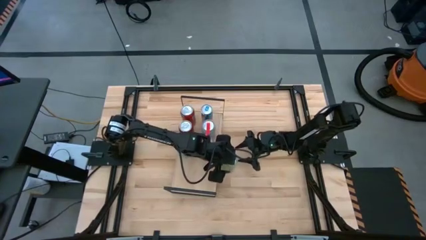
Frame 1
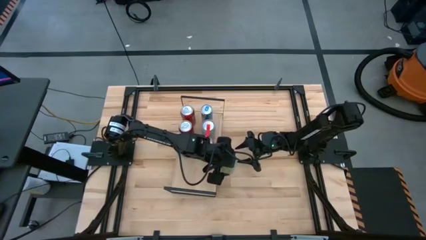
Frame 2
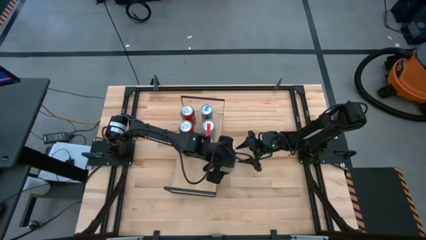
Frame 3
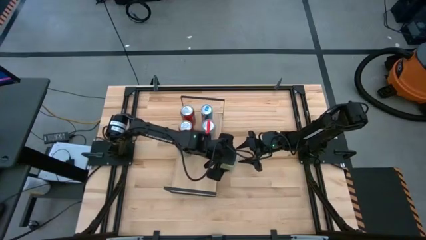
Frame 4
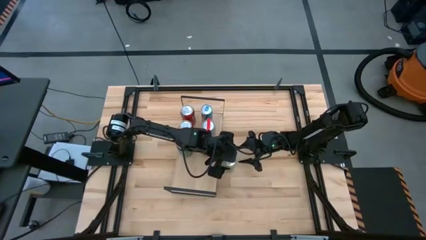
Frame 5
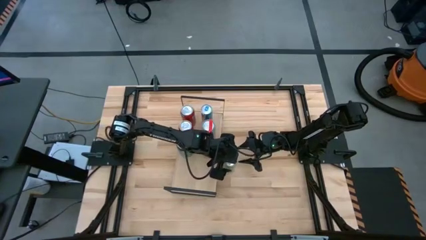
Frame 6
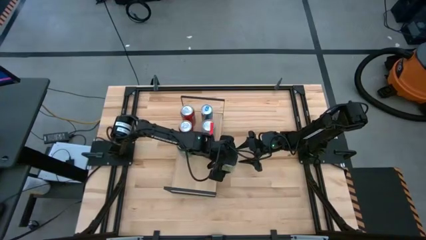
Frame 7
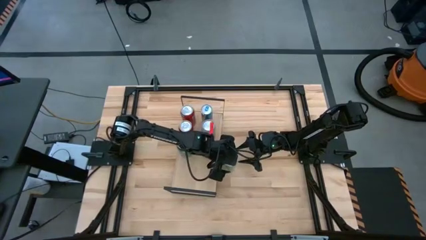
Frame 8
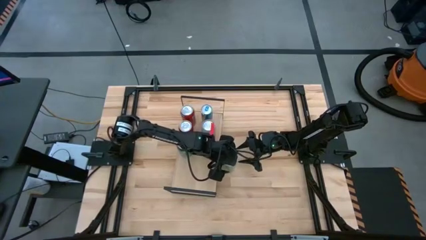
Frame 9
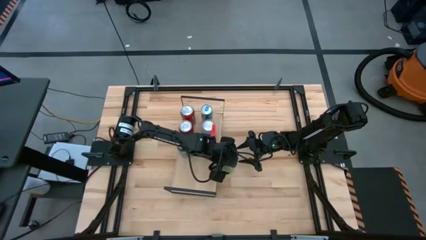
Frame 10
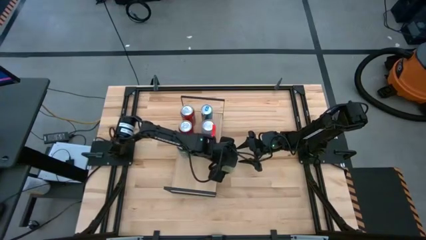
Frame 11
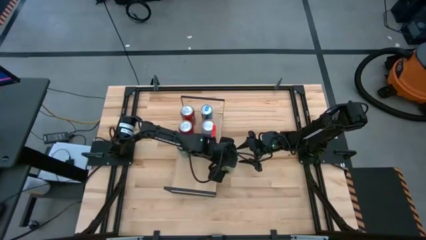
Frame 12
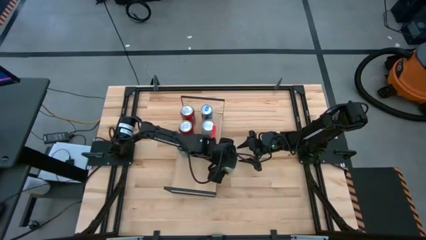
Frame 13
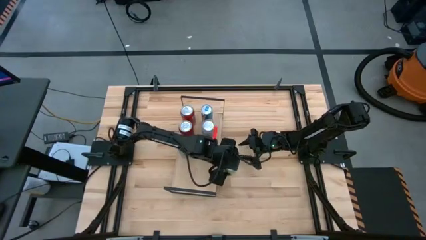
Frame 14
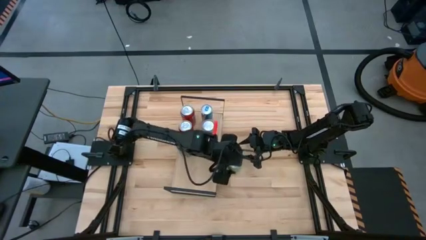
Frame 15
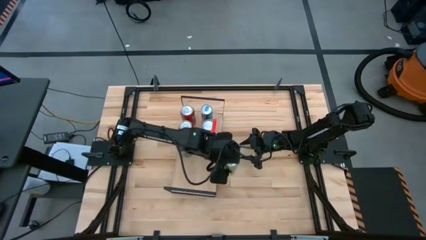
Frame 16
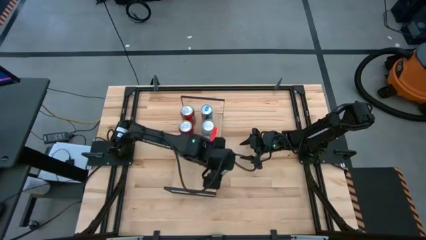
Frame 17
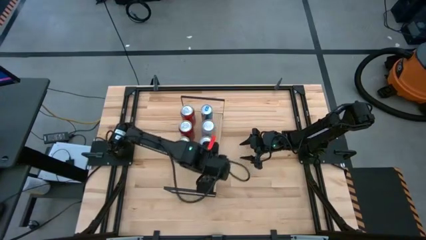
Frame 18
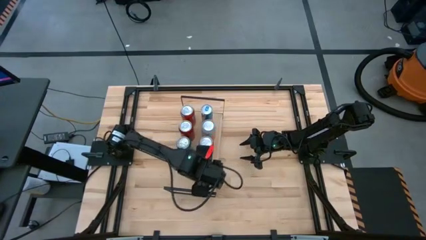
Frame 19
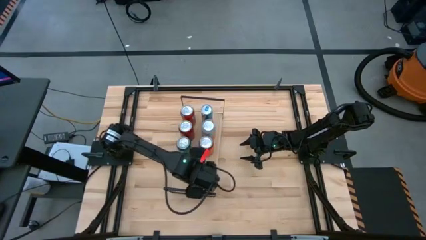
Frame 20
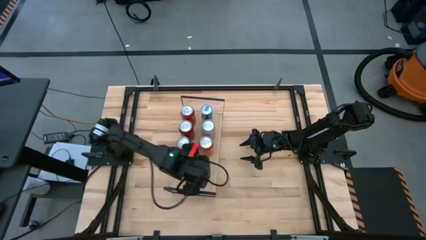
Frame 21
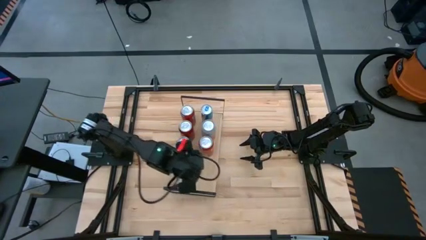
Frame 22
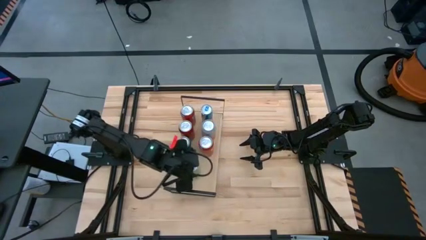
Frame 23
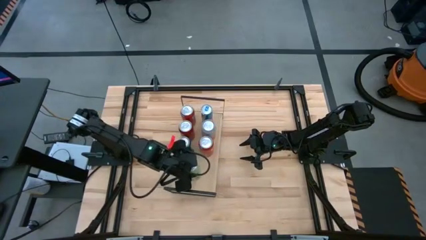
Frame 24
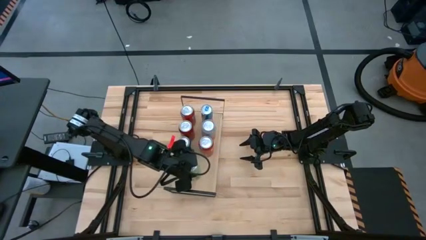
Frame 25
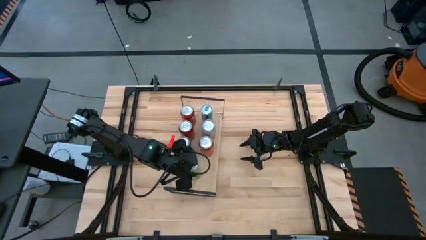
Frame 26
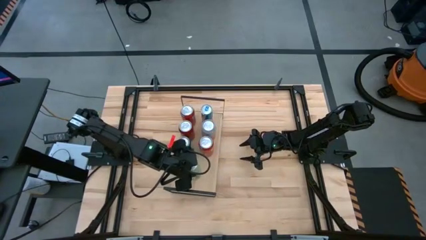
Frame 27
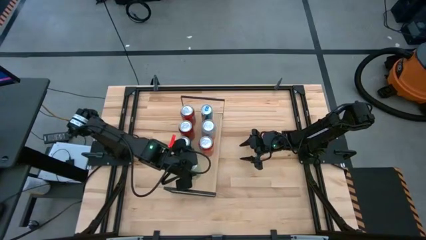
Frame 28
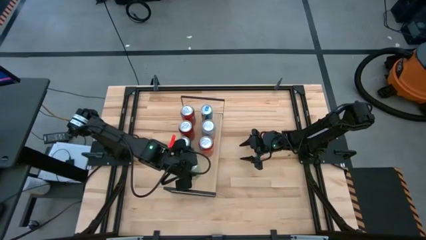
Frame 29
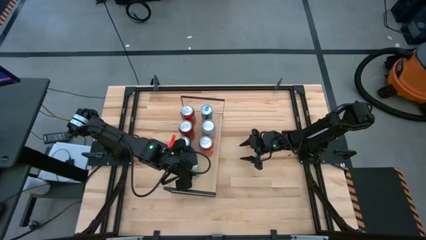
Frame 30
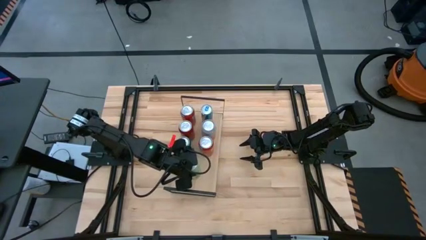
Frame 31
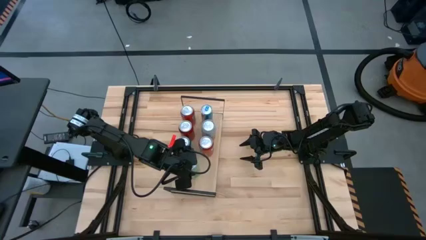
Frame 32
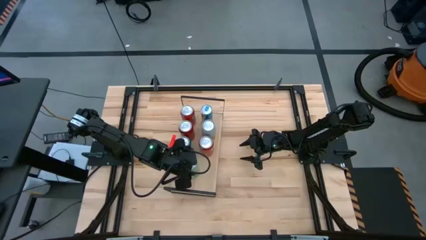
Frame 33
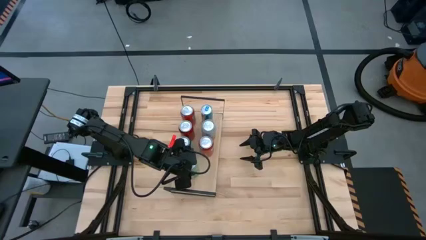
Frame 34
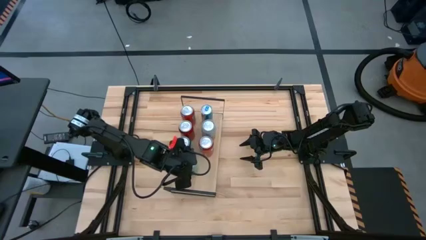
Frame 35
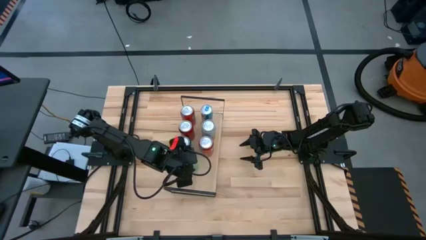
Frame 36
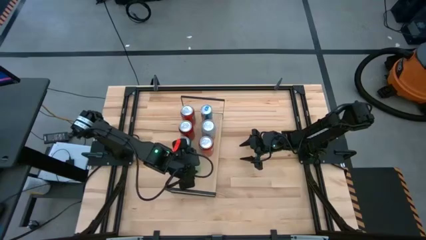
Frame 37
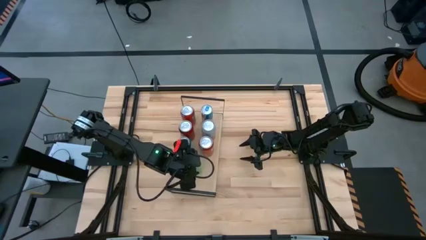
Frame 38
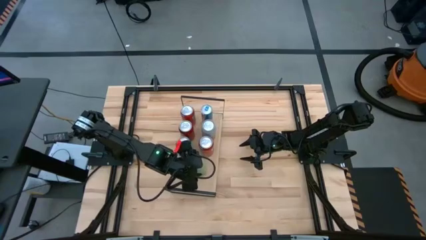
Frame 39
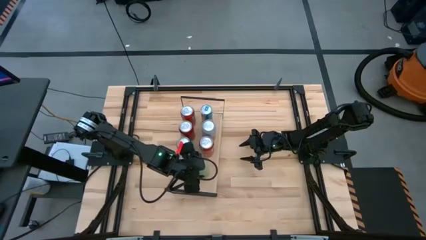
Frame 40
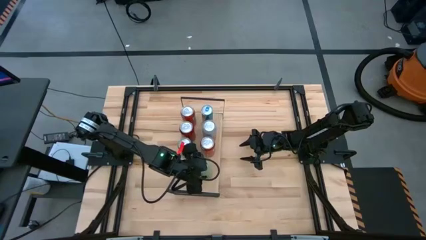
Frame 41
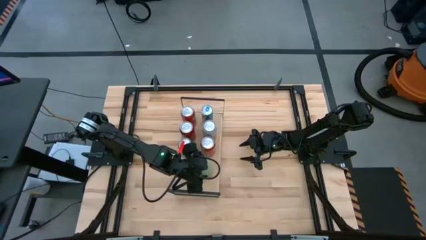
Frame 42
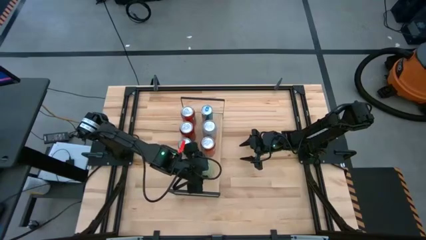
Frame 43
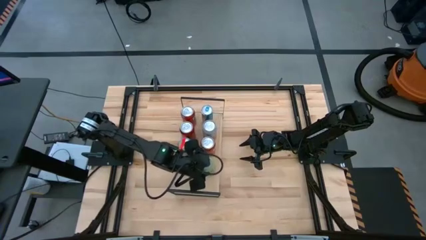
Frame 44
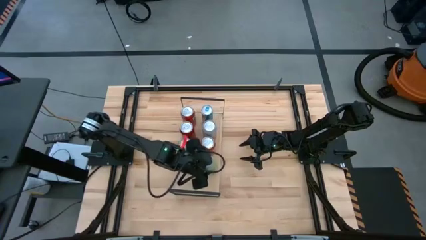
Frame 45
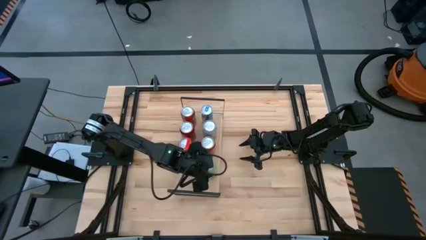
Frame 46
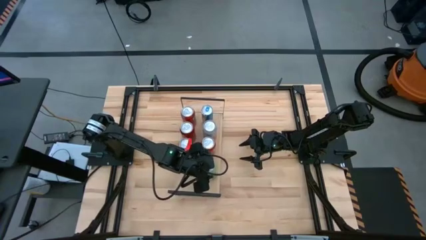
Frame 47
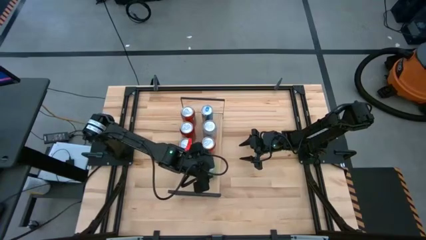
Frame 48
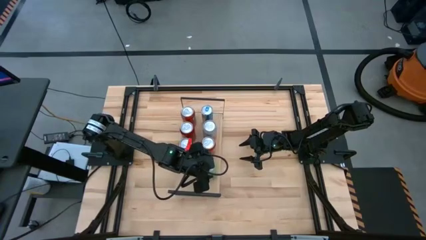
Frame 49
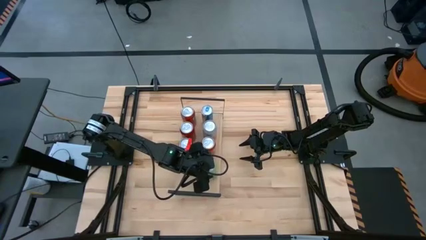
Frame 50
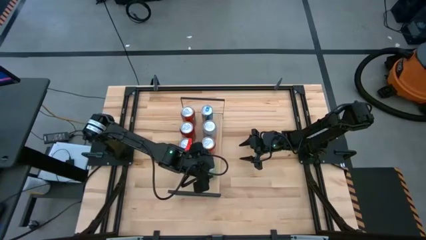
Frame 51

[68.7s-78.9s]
Task: Place canned beverage on shelf
Put the light green soda can on the shelf

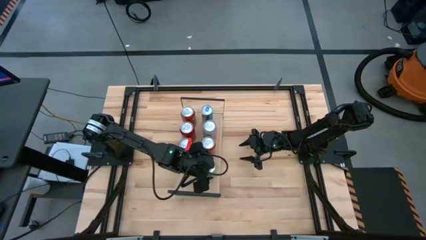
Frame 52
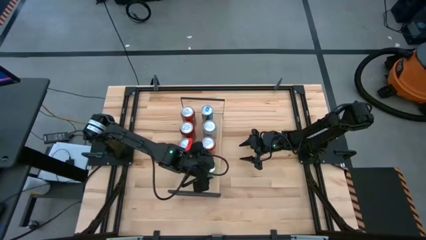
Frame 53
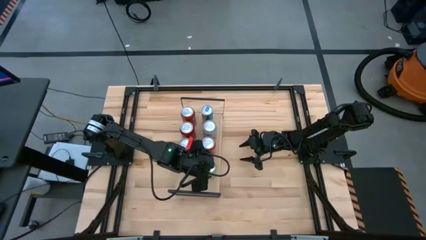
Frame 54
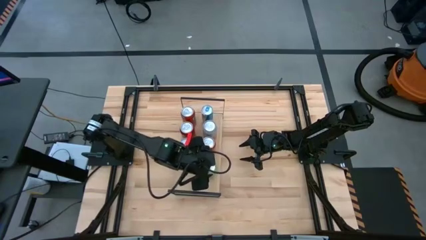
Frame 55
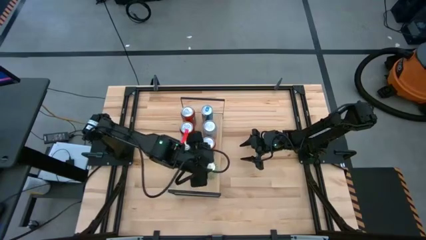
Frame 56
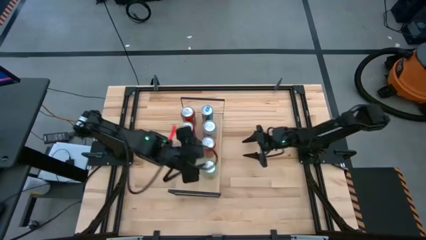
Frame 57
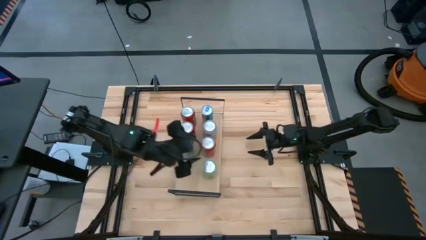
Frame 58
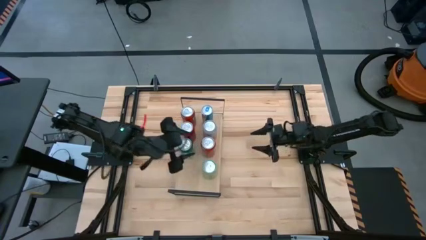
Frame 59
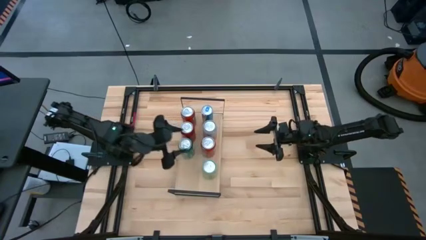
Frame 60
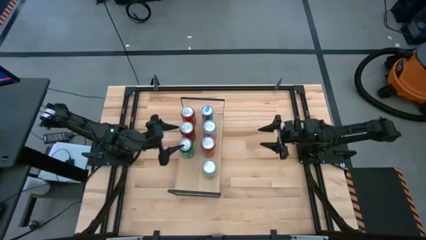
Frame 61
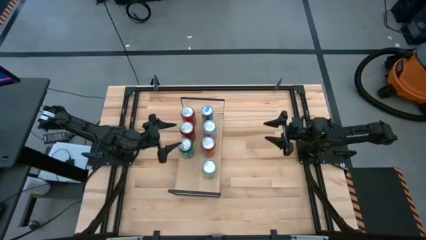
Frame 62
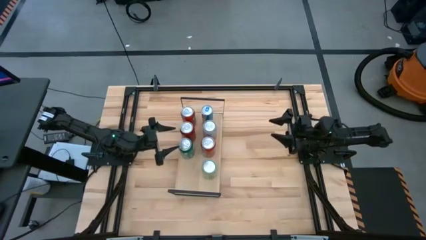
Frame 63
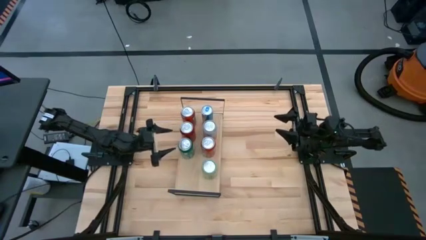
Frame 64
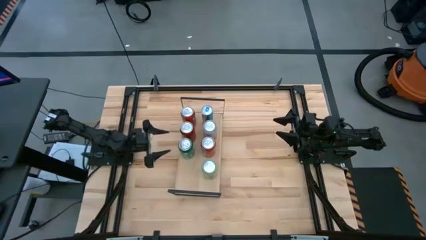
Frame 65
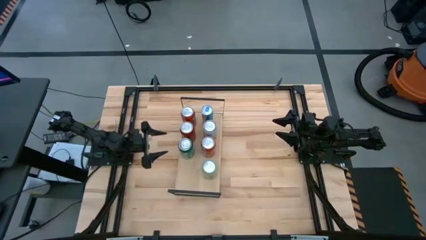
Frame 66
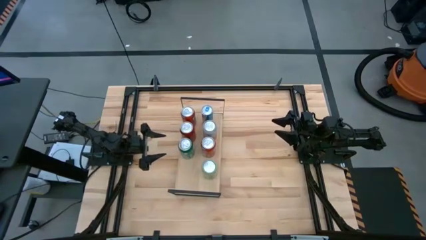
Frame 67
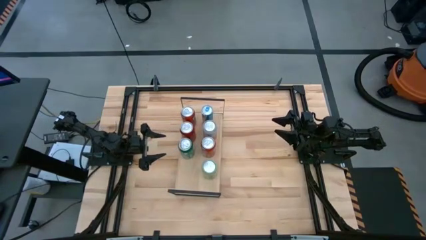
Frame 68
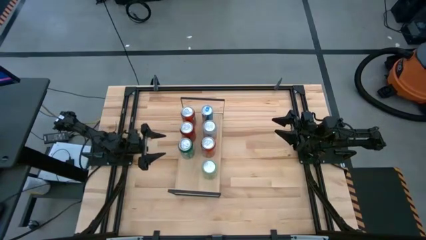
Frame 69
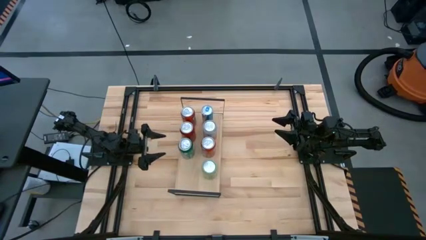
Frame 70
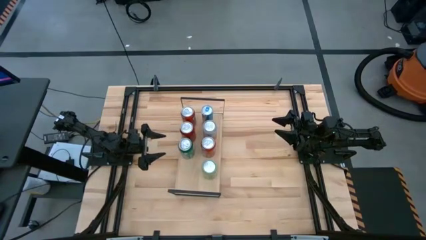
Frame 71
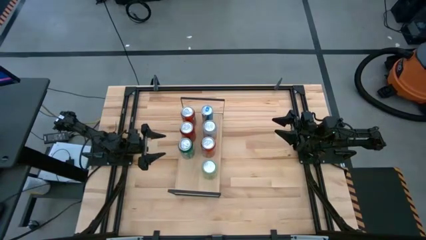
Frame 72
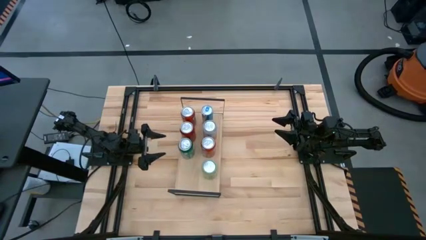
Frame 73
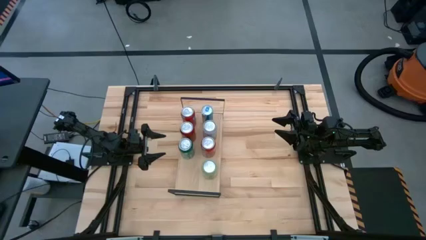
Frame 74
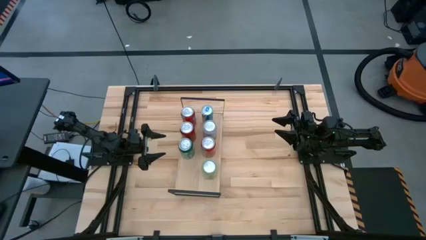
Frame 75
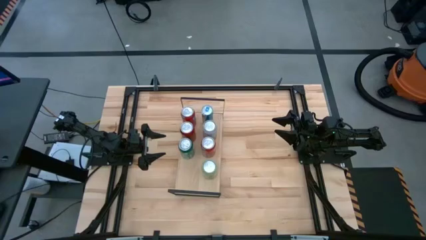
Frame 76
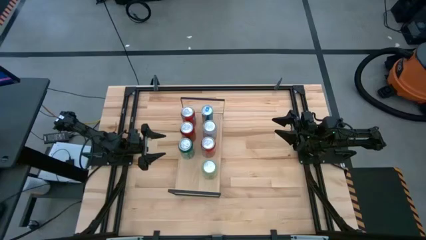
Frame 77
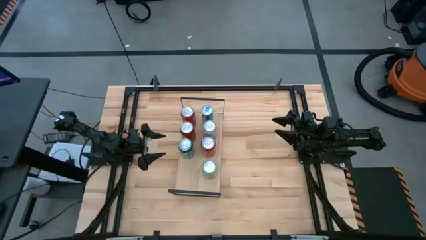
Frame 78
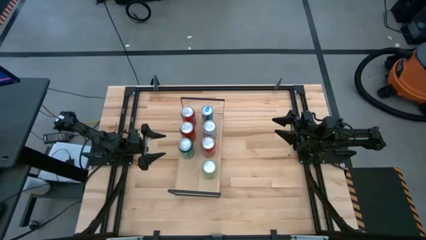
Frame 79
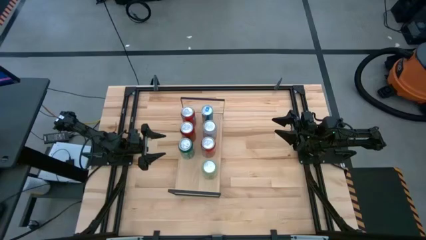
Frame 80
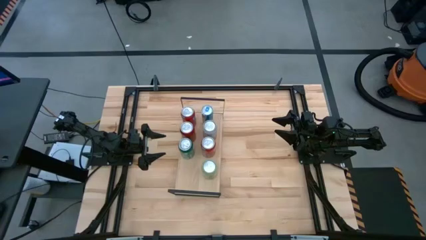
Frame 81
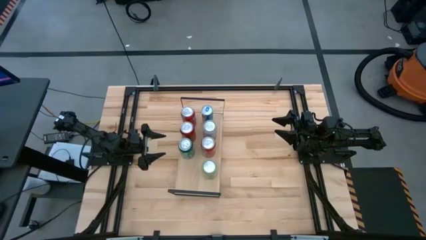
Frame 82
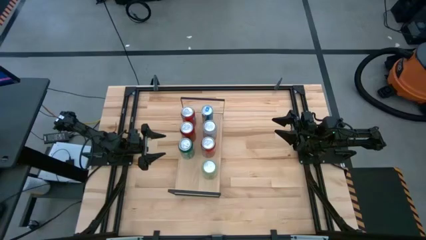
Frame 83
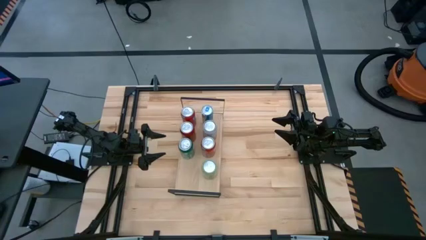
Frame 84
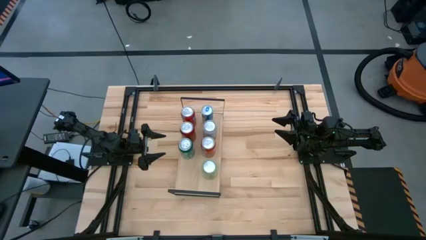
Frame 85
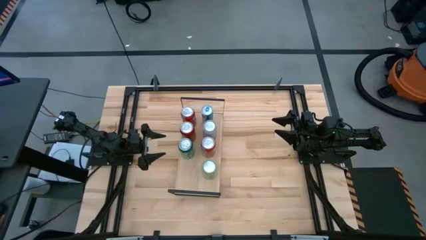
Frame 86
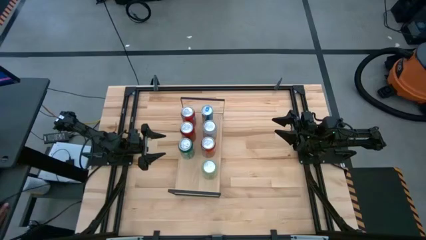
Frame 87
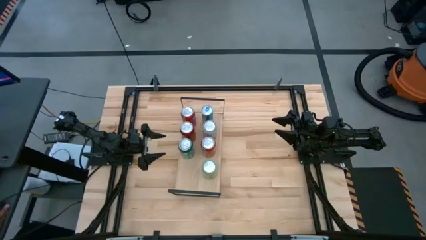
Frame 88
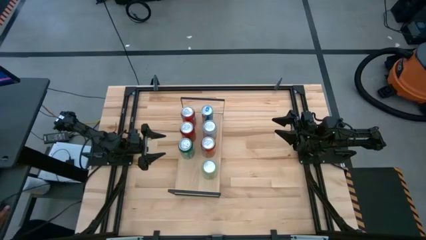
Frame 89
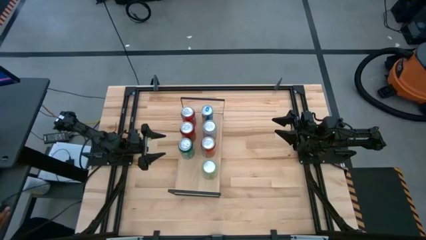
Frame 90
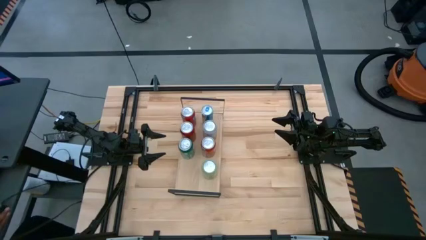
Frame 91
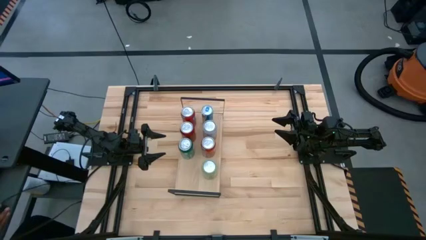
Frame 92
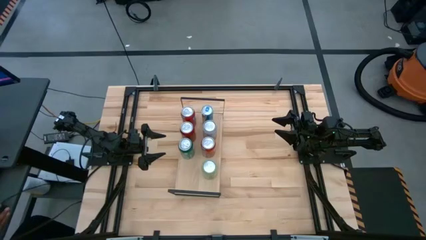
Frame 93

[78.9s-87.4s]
Return to Home Position
